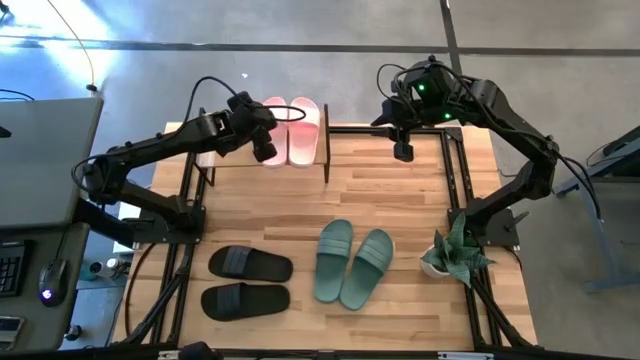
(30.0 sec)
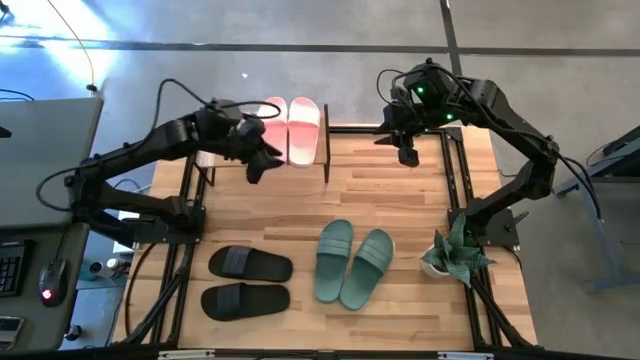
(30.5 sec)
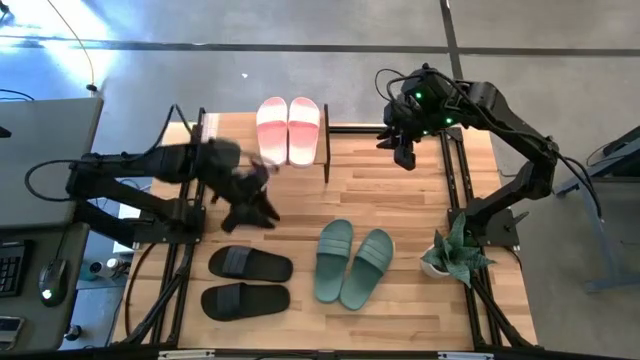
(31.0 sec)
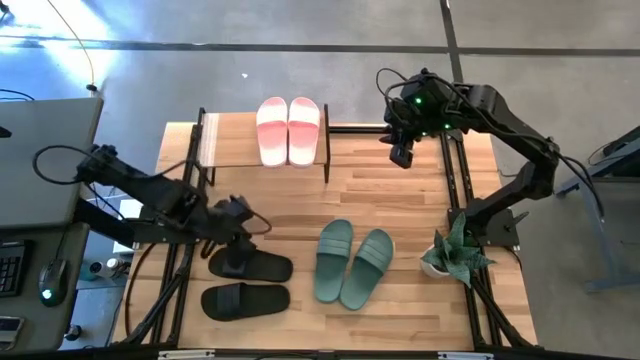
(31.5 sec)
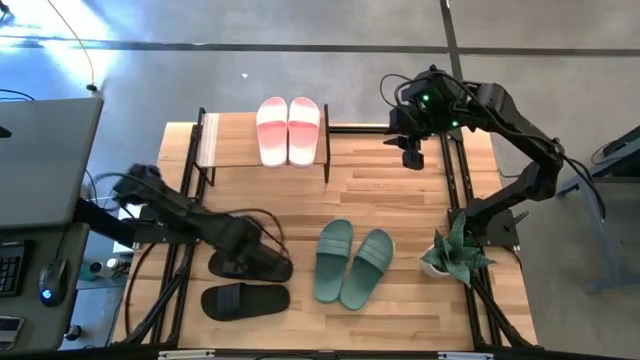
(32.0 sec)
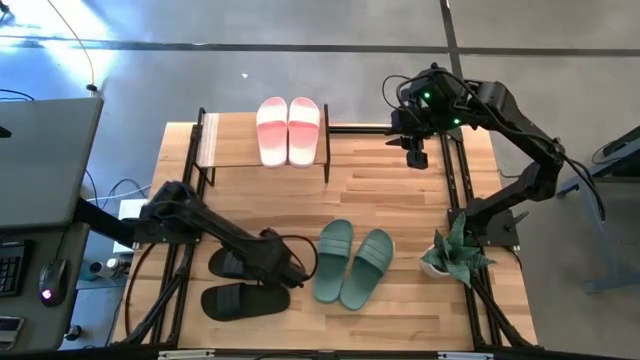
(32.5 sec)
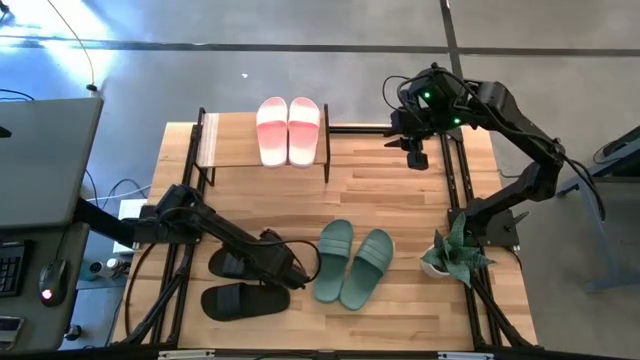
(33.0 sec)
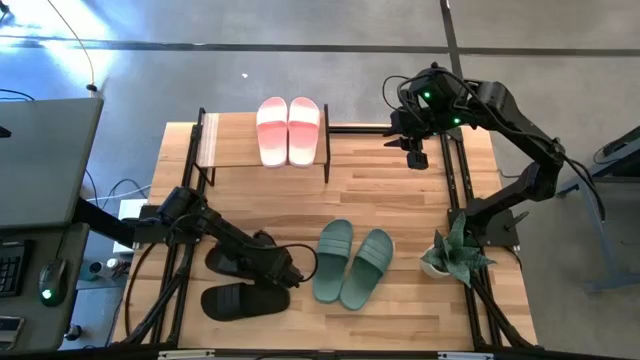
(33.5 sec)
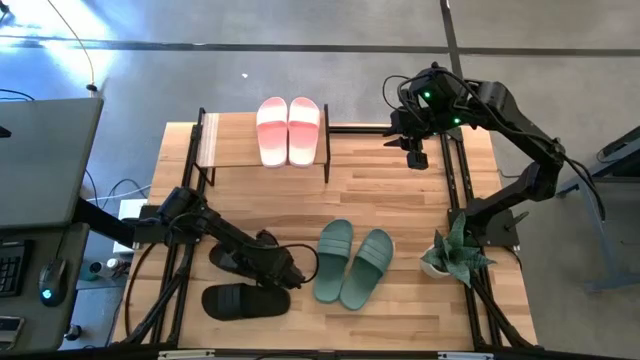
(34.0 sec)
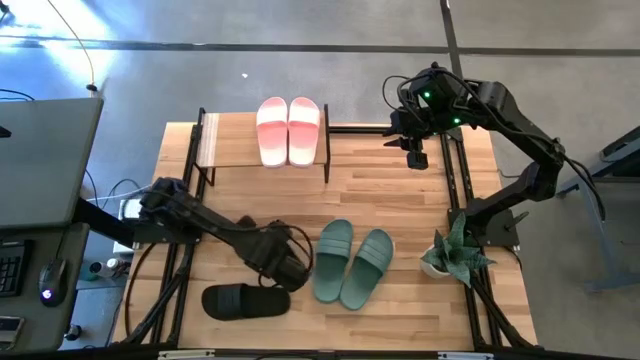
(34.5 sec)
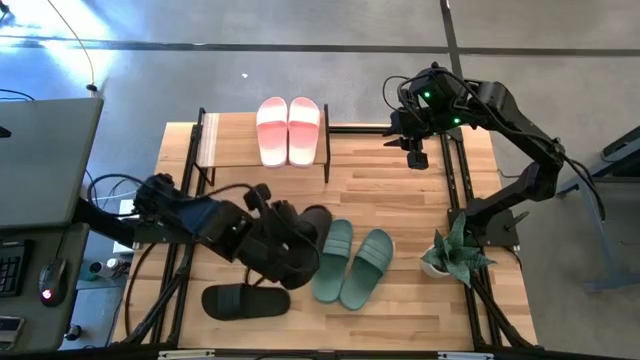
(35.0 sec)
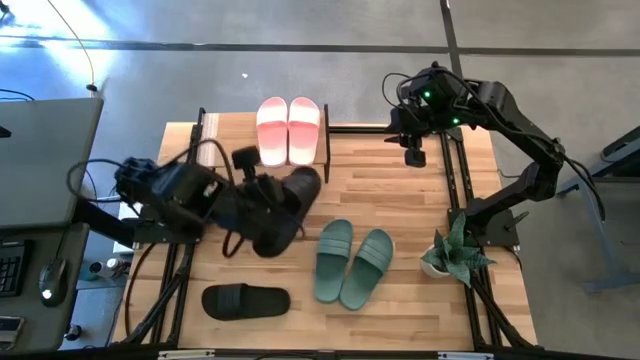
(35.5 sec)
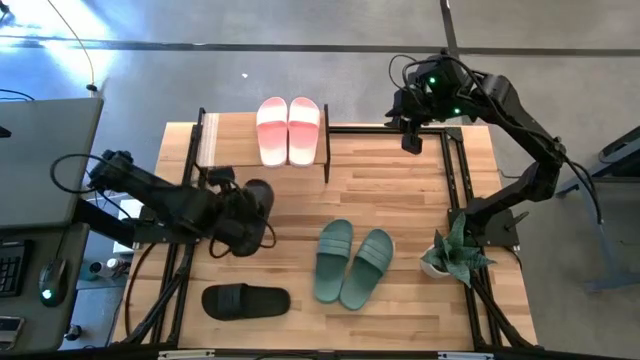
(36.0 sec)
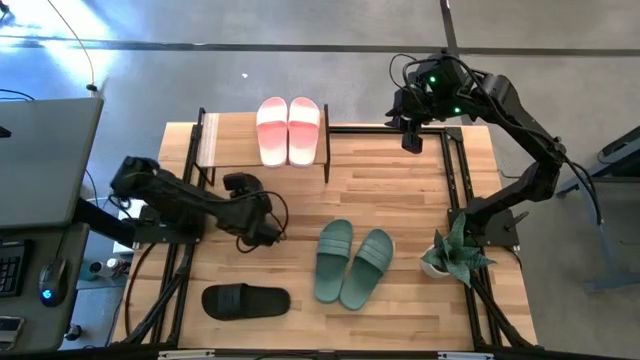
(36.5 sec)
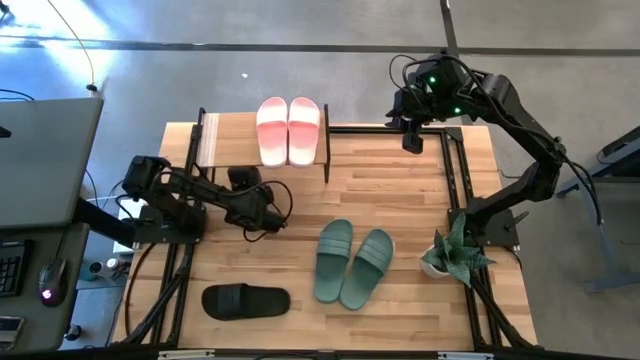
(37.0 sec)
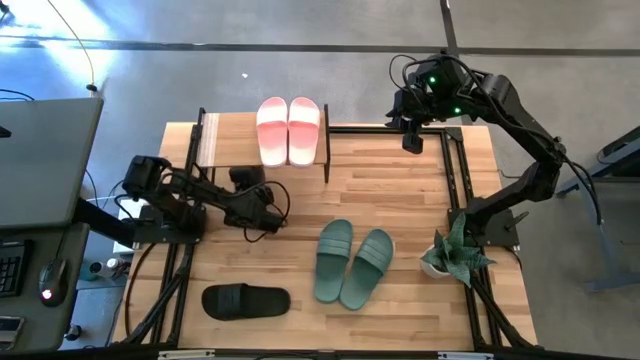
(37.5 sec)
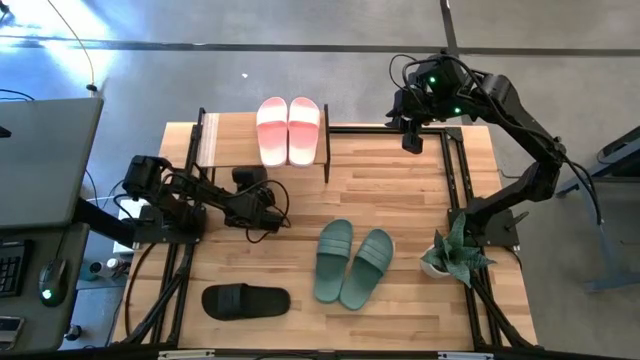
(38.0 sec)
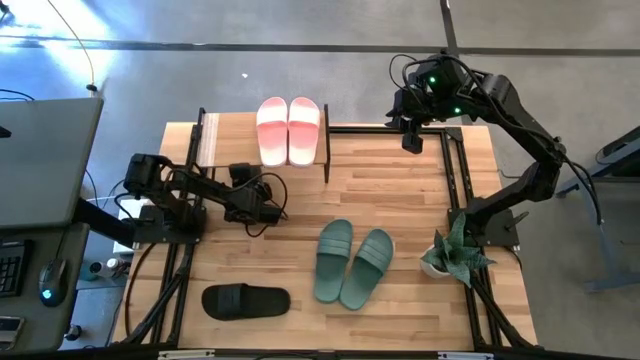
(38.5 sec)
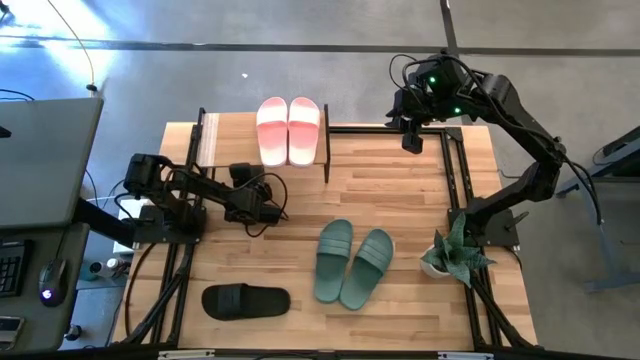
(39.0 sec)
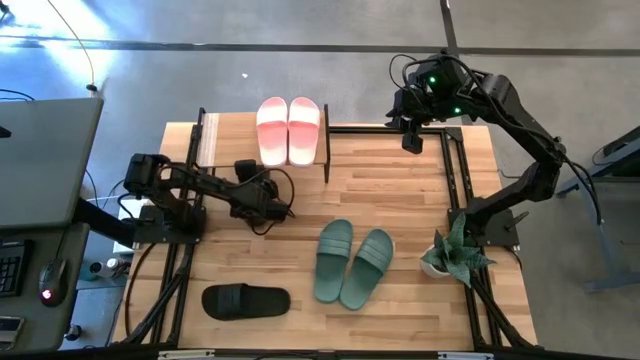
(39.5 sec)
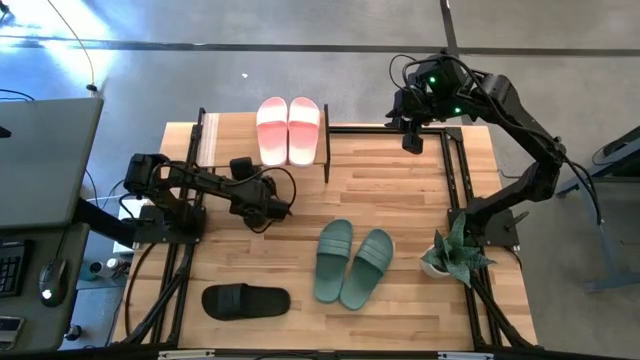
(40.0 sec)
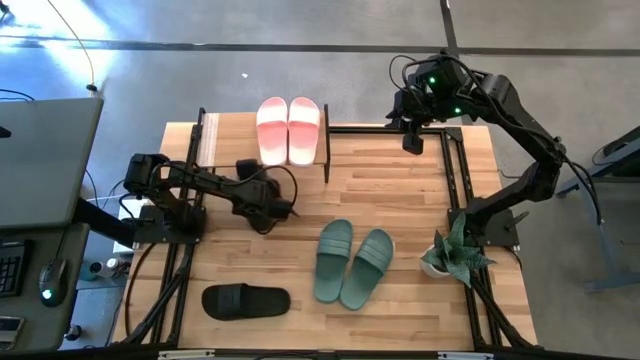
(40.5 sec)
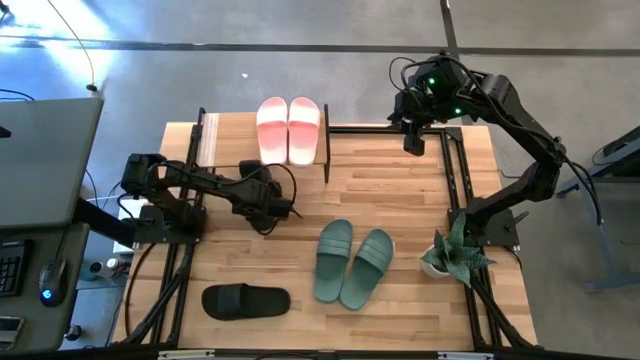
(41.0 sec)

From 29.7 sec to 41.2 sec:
Task: Pick and place slides into the shelf
Put the top black slide under the shelf

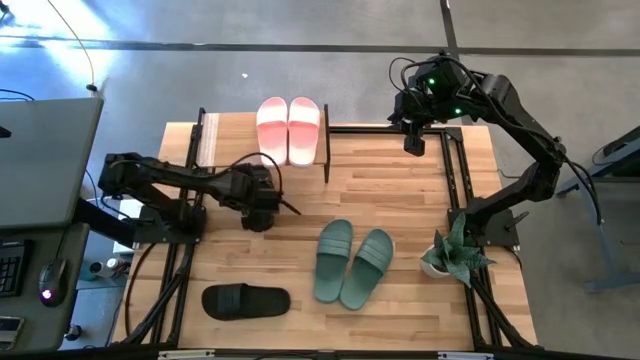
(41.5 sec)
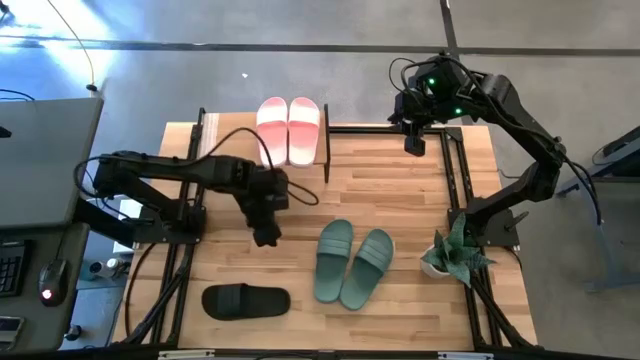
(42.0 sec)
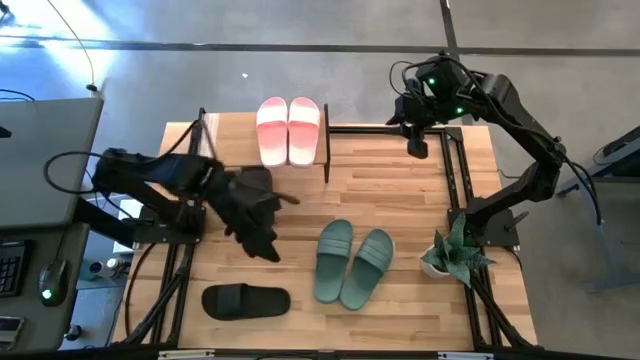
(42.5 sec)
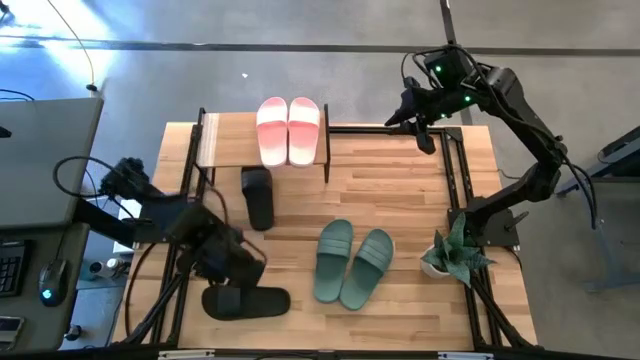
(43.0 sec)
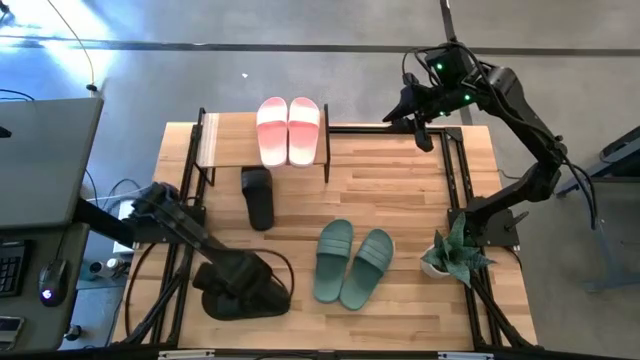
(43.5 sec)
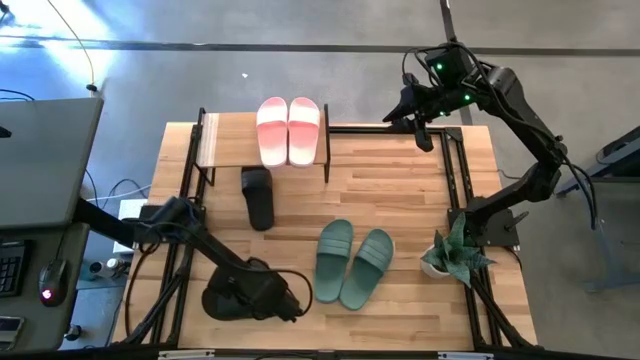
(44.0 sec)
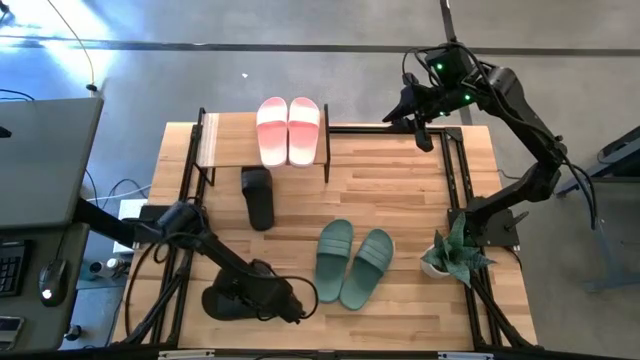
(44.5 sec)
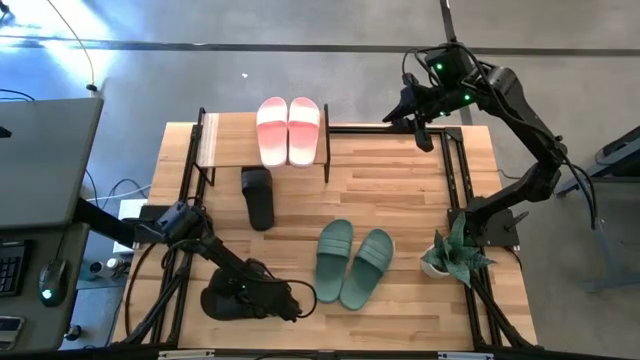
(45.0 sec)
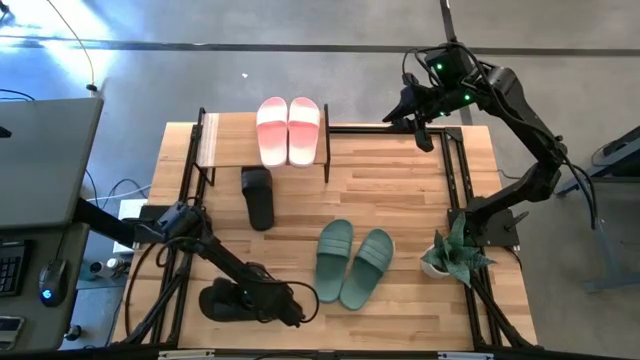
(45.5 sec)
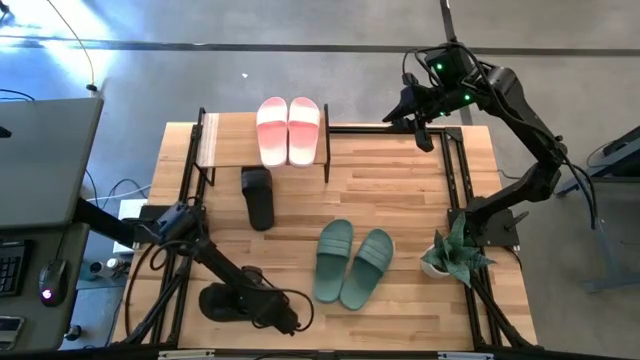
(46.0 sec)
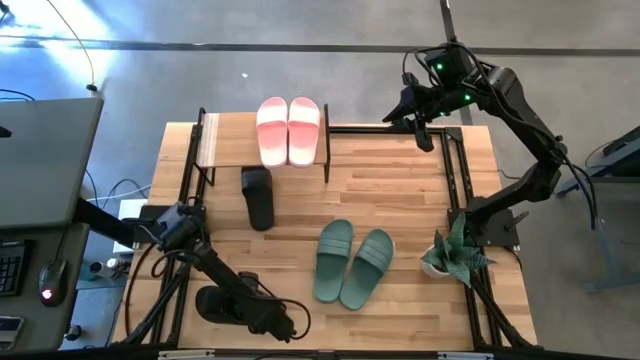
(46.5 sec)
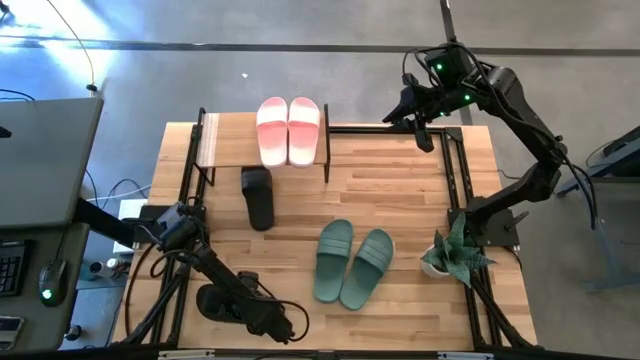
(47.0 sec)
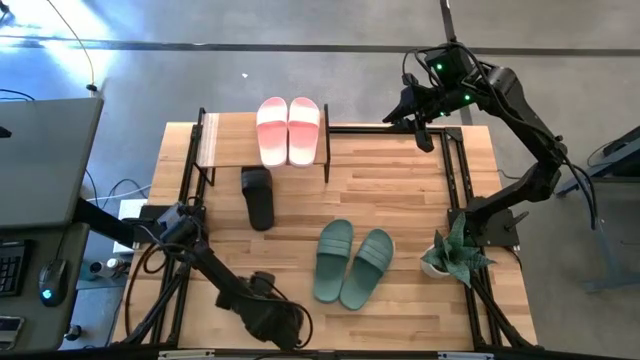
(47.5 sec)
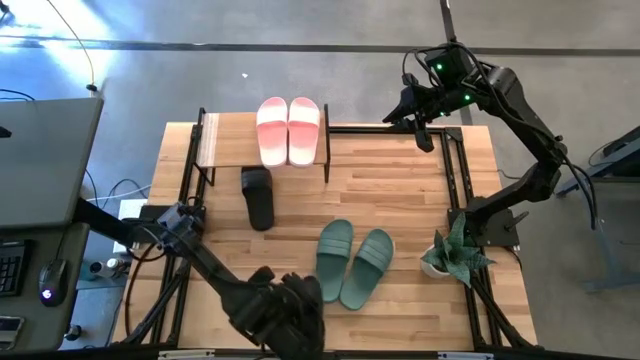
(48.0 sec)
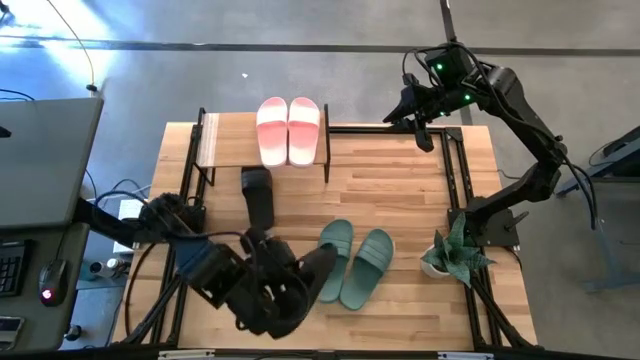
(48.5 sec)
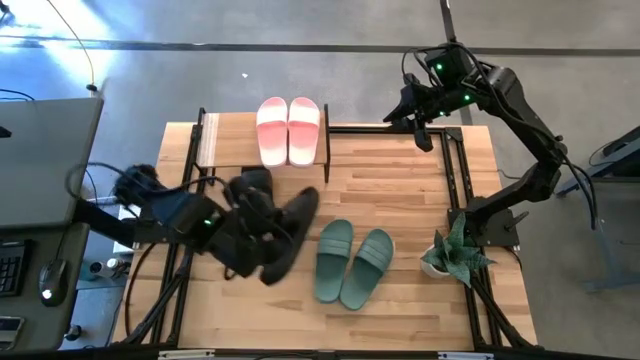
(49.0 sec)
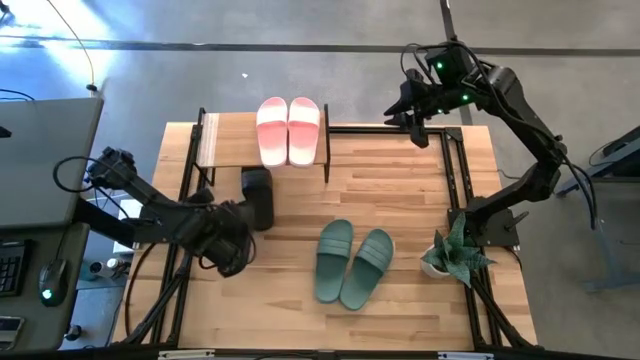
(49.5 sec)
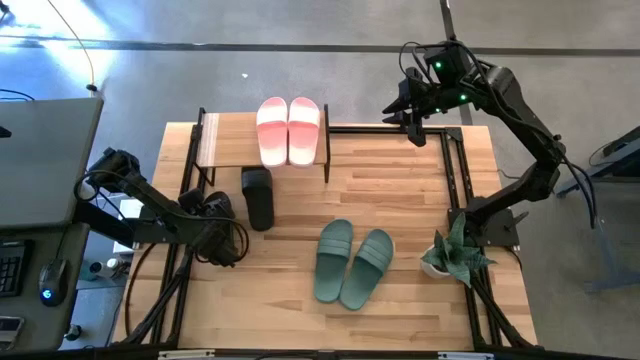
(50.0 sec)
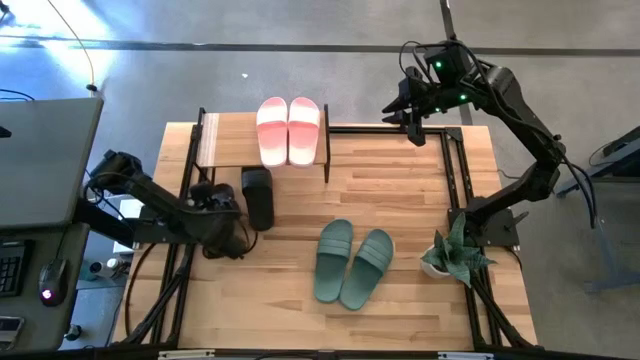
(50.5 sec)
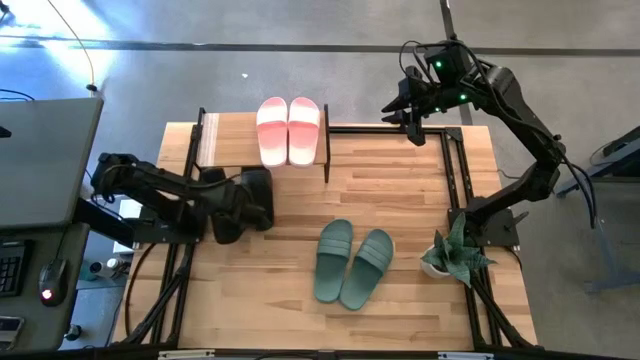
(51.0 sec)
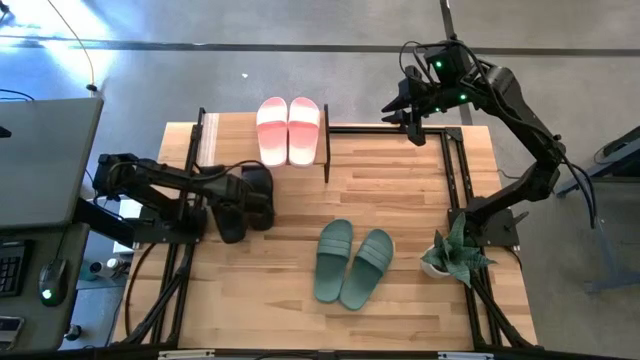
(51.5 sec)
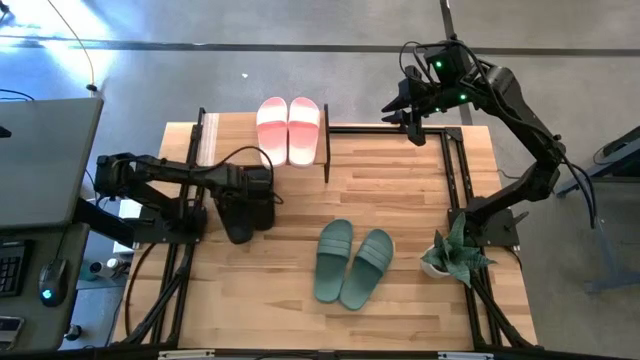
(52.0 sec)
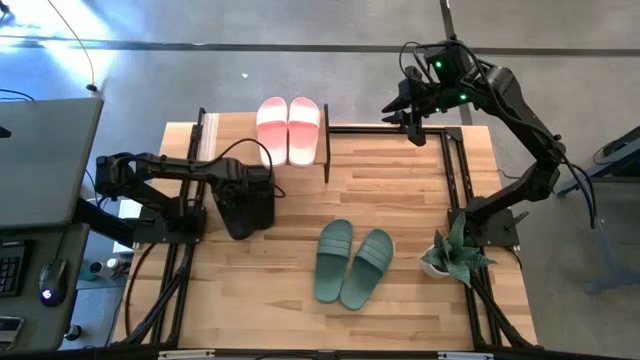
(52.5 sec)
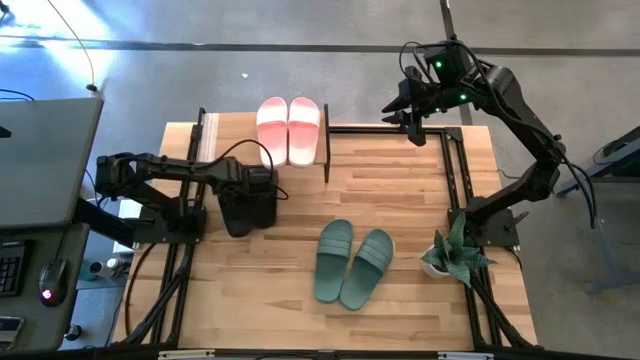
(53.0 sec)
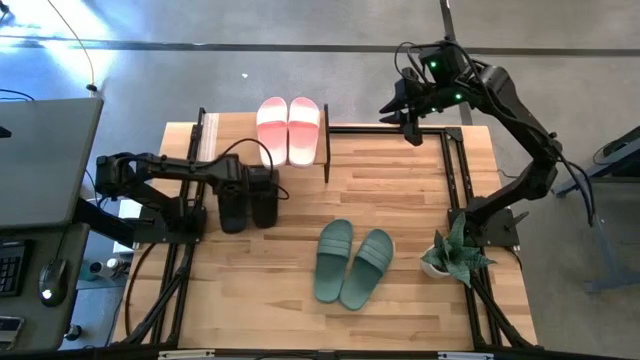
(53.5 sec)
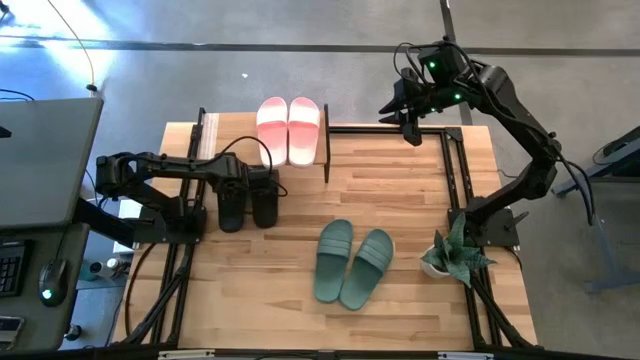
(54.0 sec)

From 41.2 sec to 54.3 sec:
Put the black slide under the shelf
